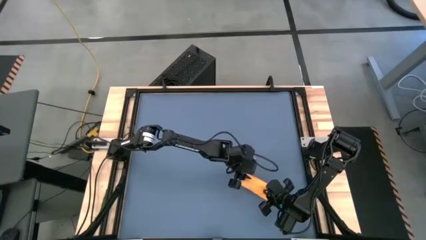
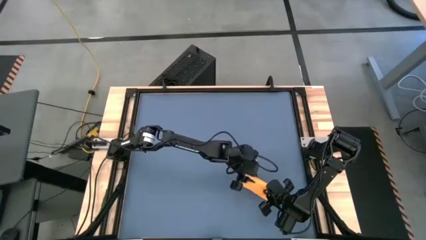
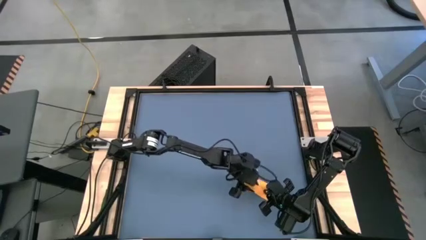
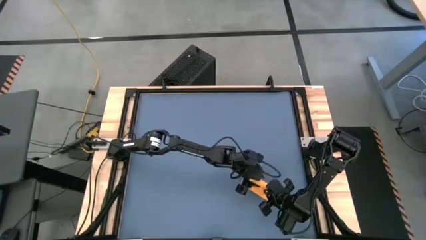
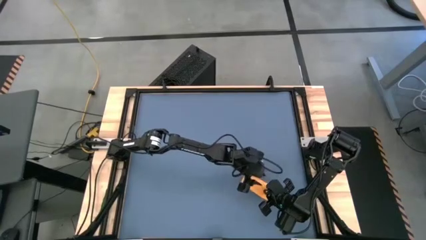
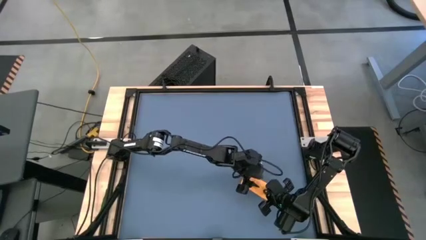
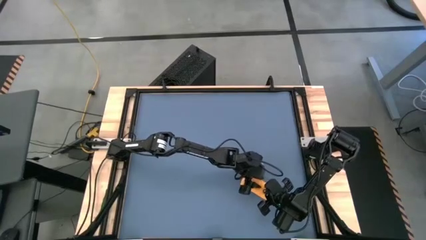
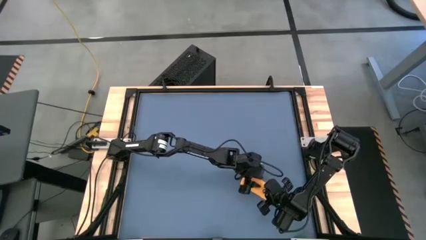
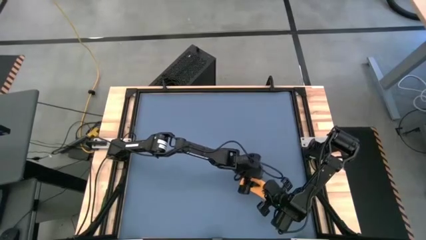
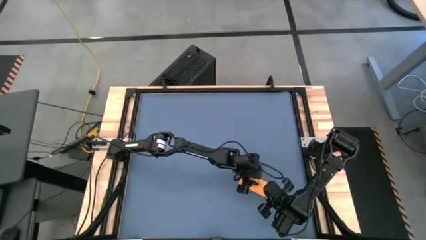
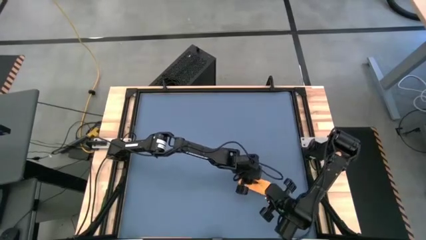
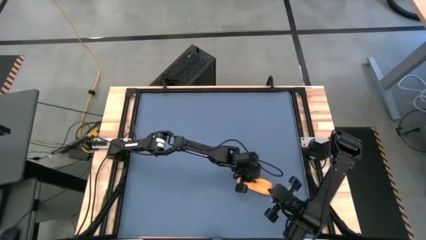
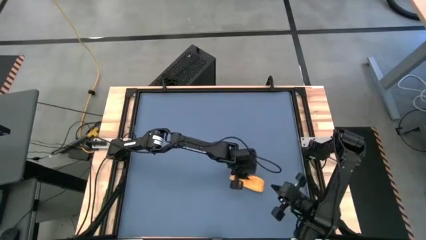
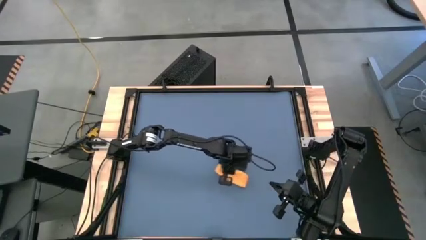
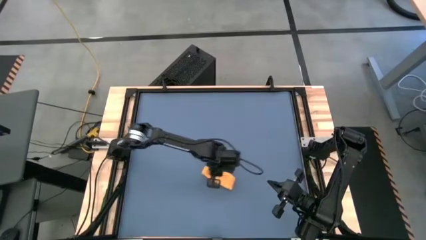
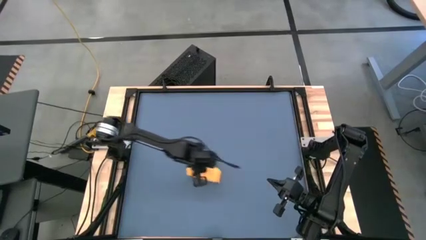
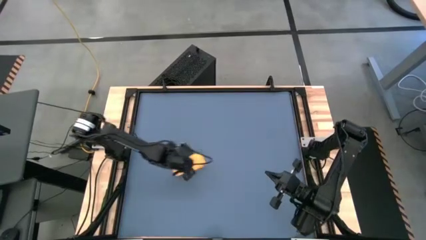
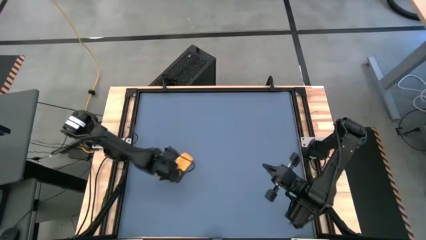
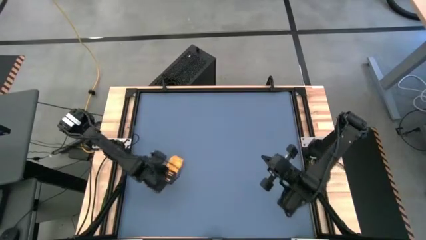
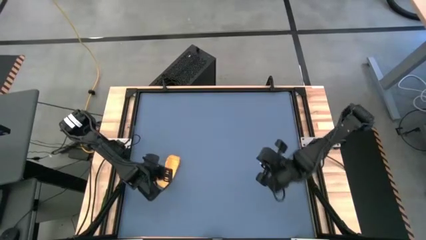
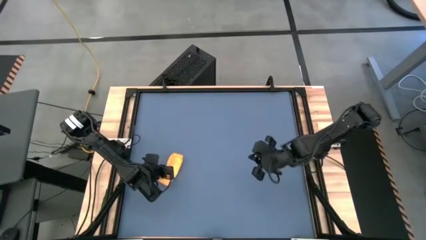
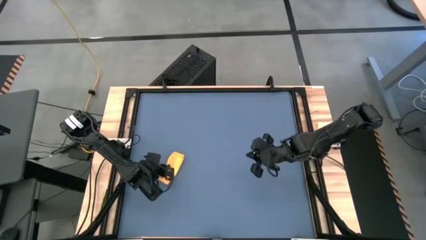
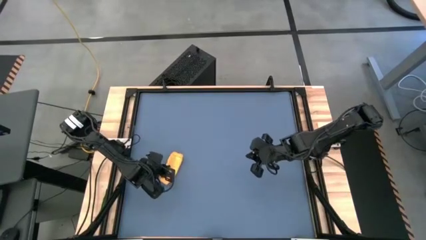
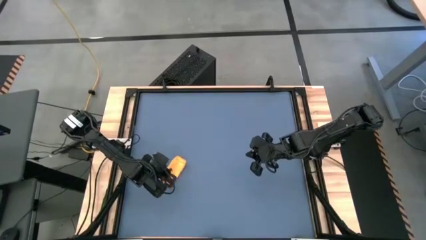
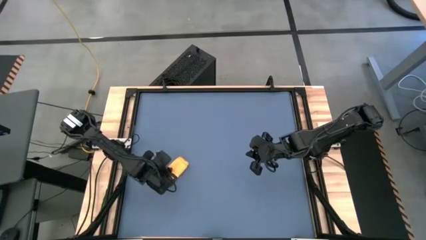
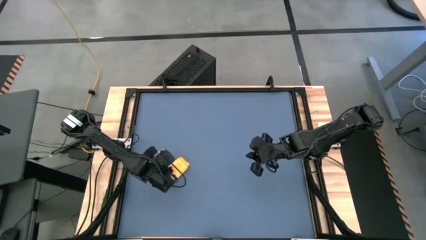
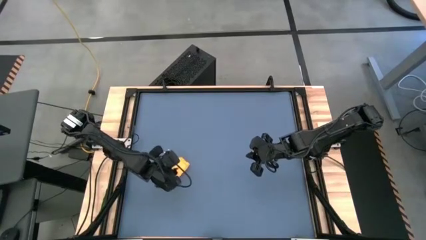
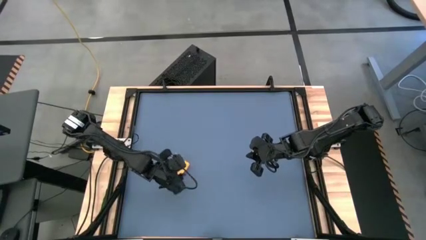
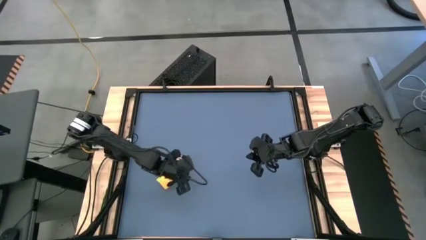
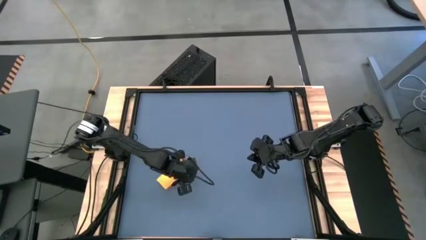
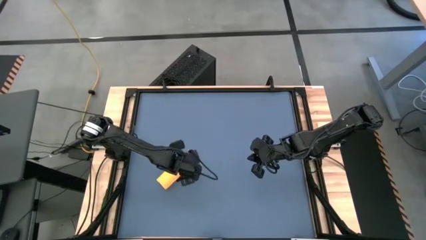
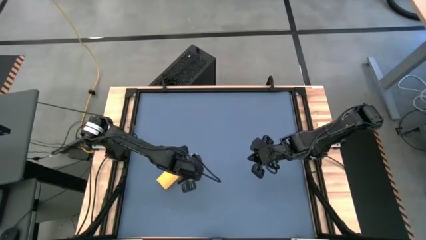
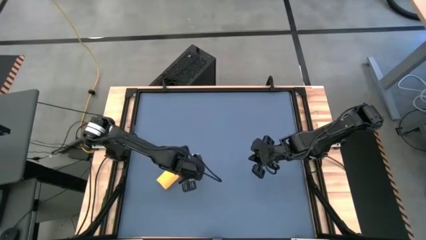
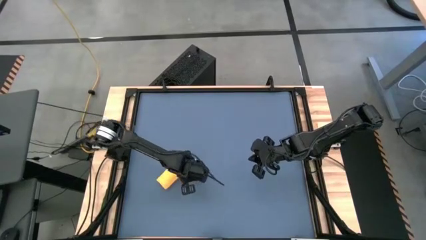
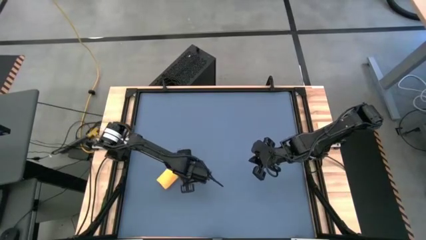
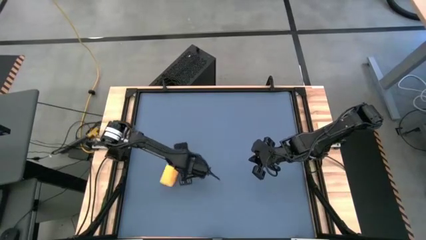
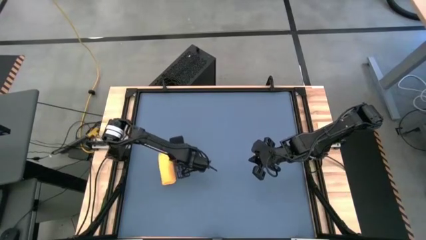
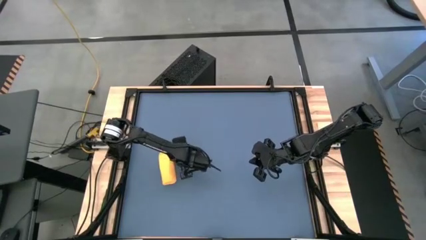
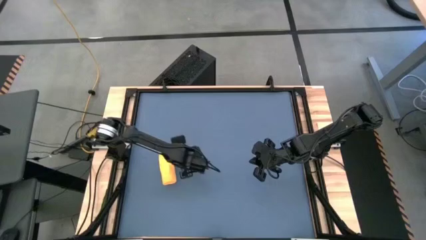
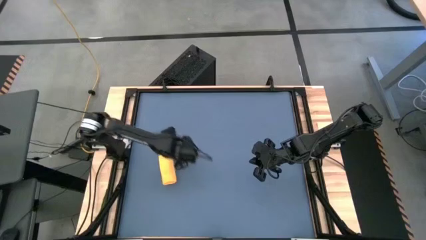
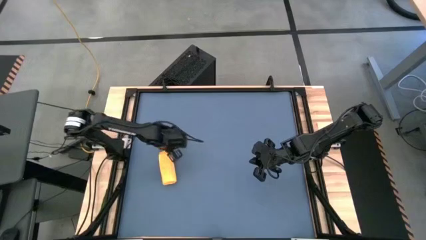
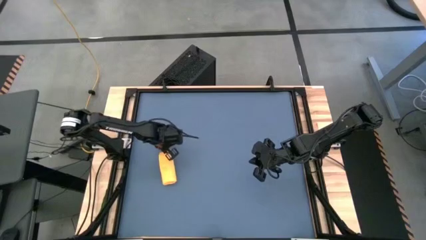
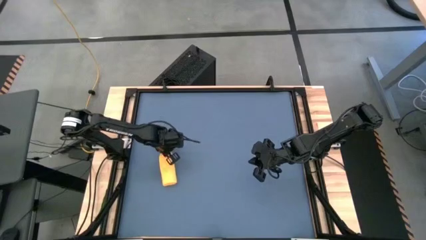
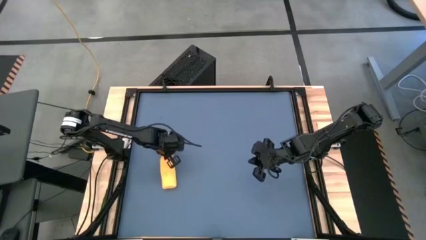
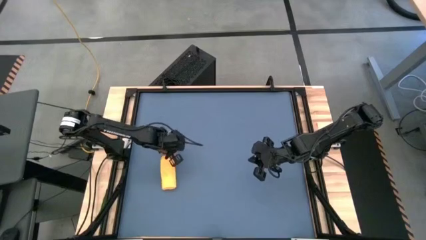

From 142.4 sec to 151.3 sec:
Task: Roll towel
Move the orange microfiber towel to the left of the table

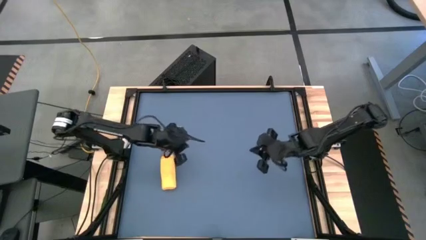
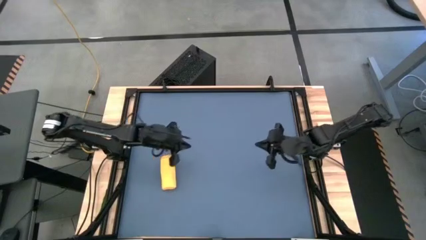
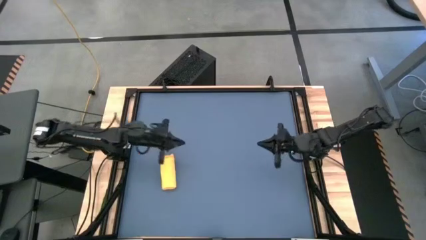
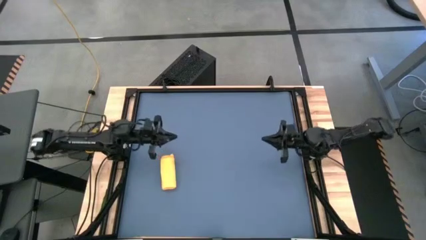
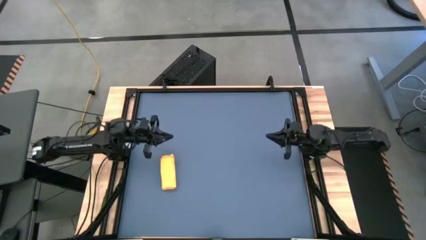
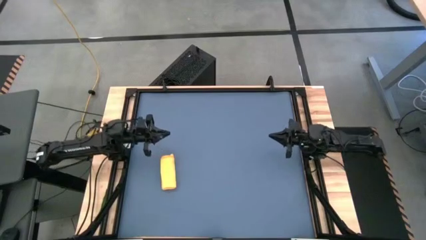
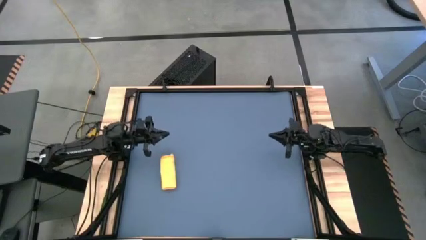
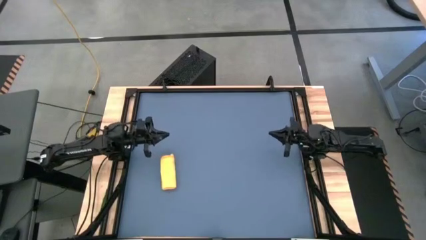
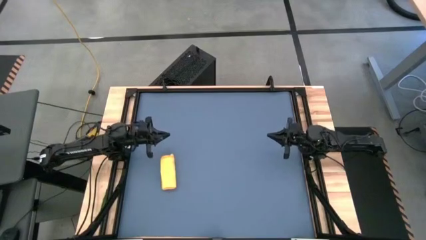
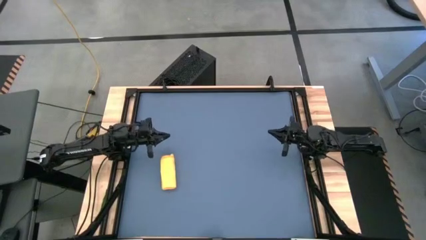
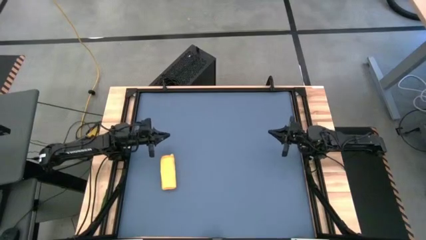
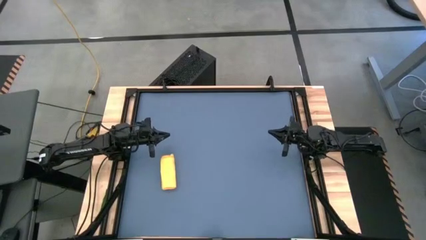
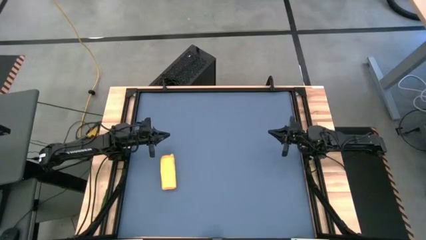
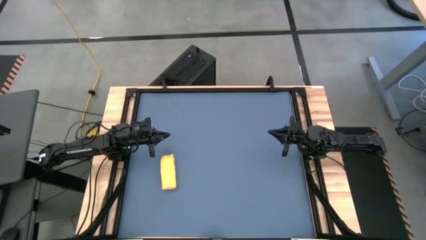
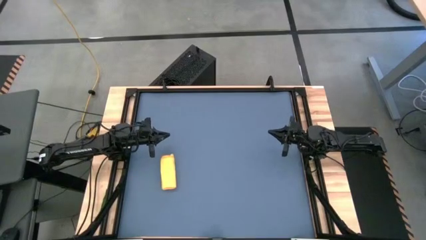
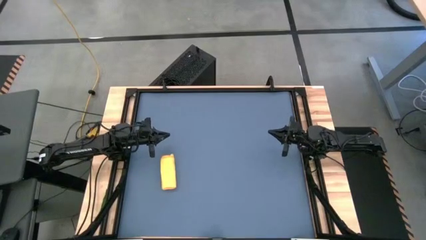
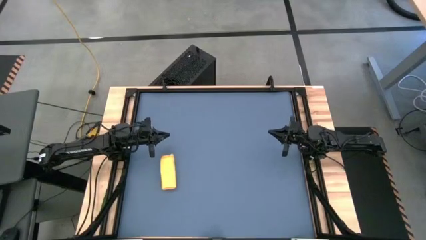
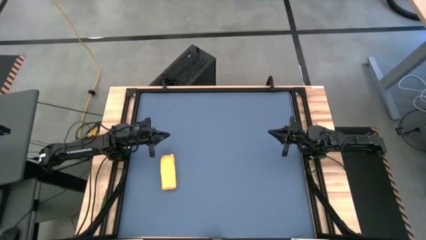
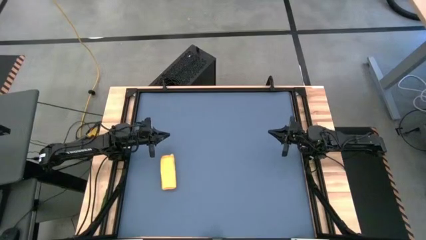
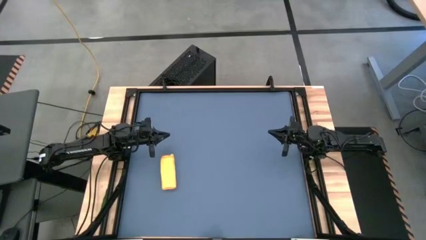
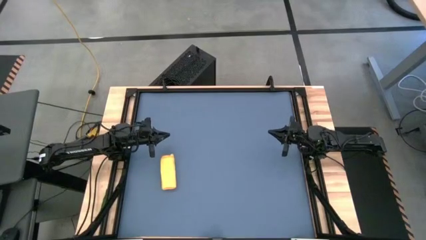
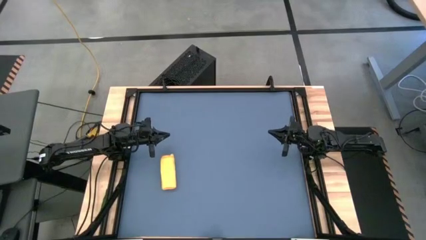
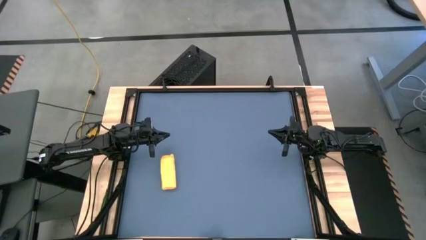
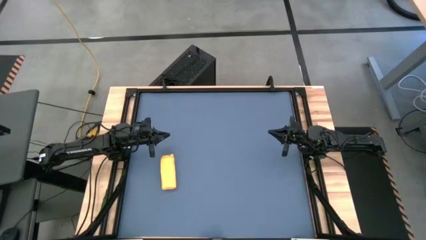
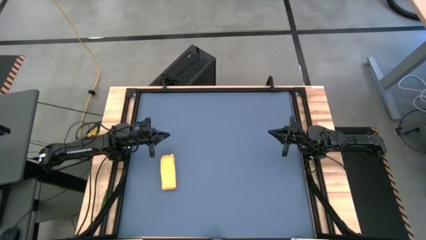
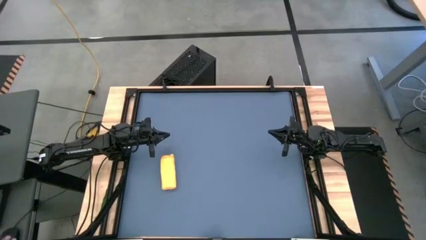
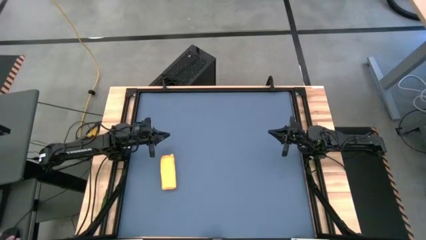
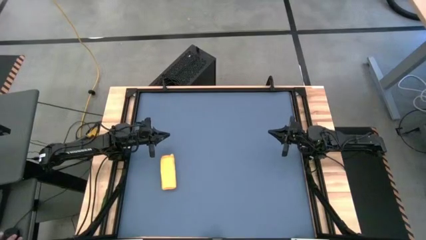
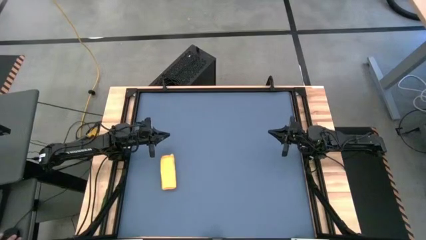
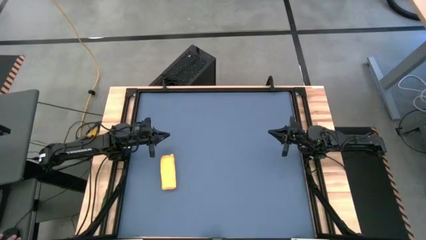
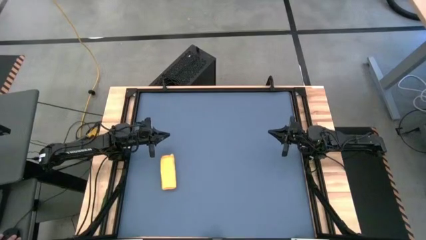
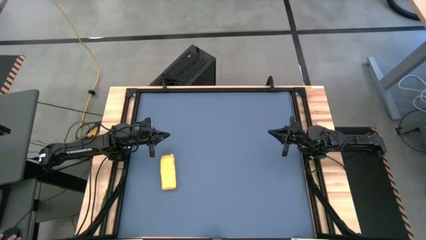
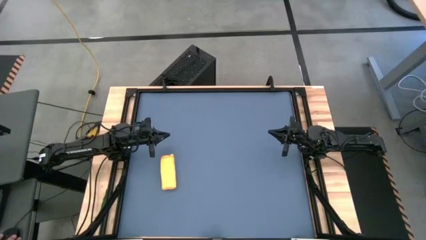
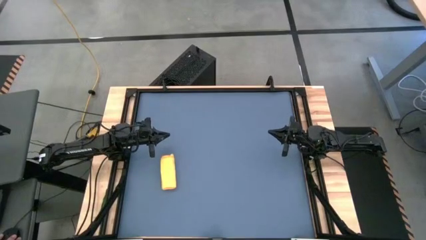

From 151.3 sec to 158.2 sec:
Return to Home Position
